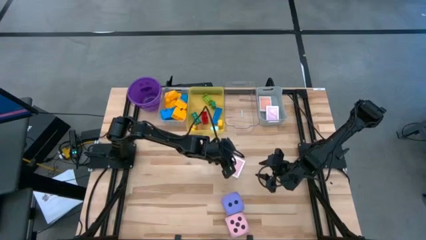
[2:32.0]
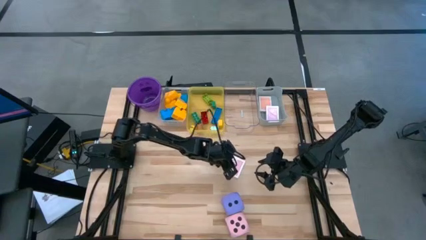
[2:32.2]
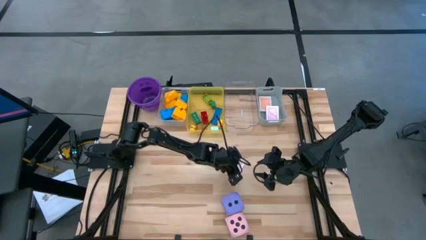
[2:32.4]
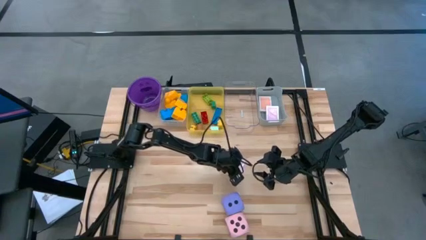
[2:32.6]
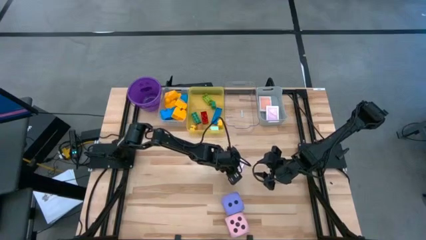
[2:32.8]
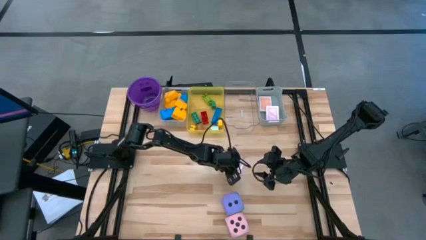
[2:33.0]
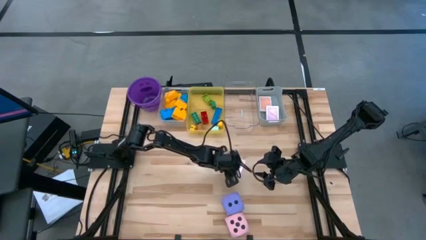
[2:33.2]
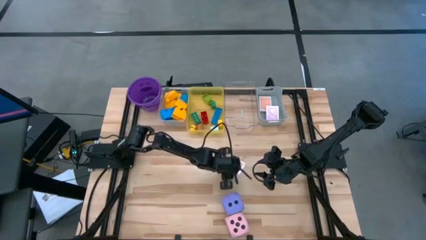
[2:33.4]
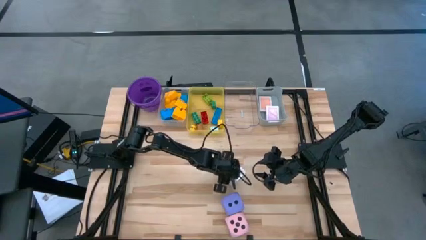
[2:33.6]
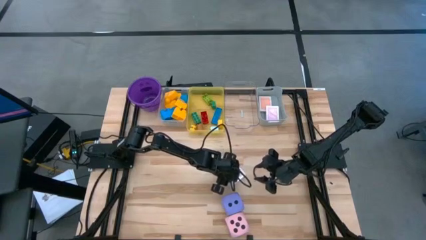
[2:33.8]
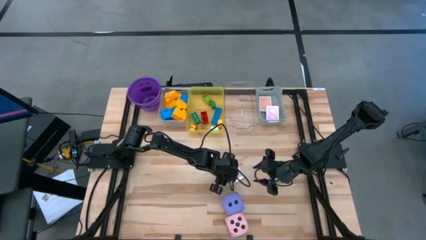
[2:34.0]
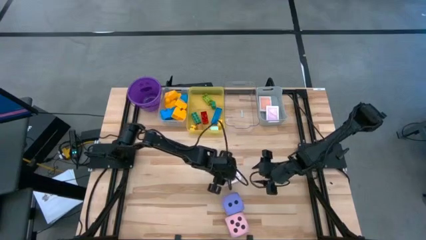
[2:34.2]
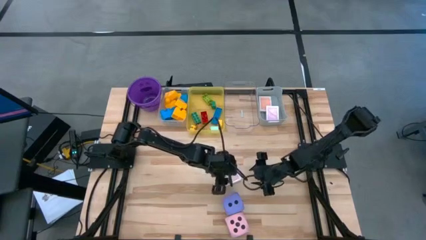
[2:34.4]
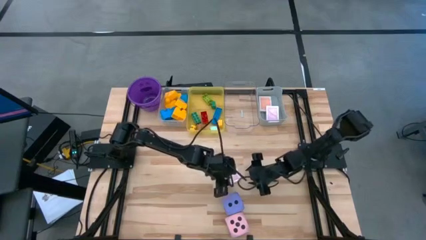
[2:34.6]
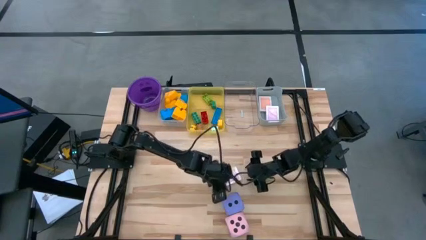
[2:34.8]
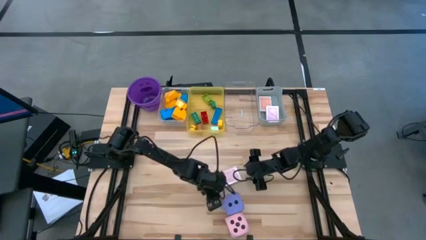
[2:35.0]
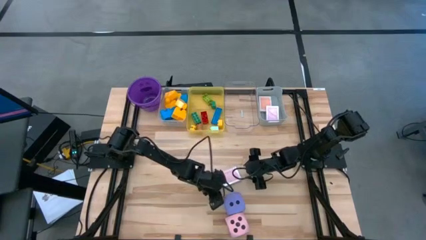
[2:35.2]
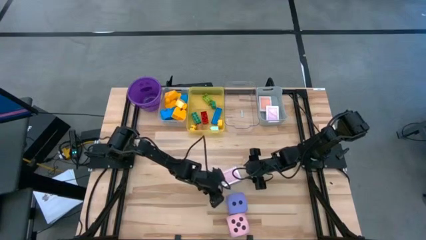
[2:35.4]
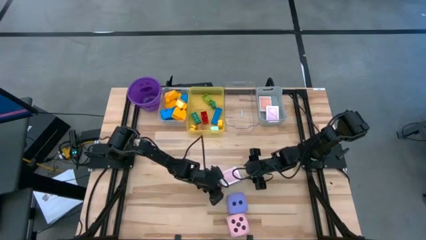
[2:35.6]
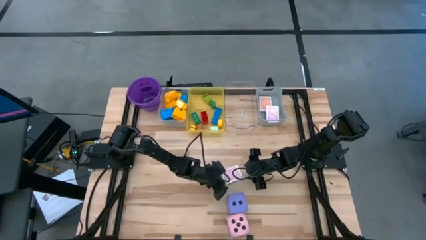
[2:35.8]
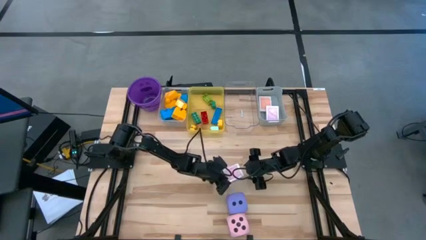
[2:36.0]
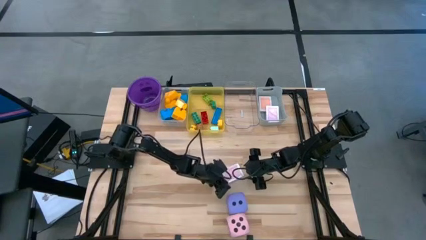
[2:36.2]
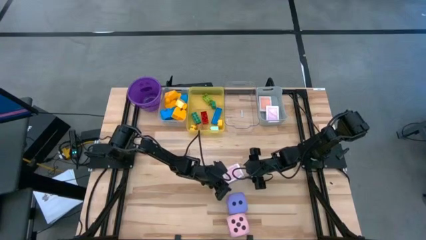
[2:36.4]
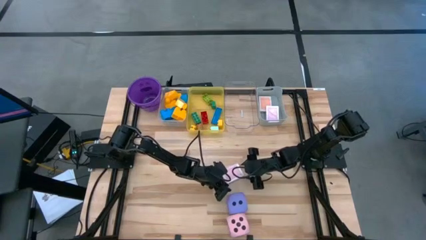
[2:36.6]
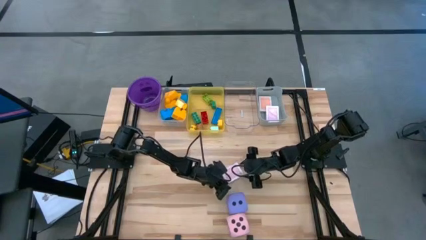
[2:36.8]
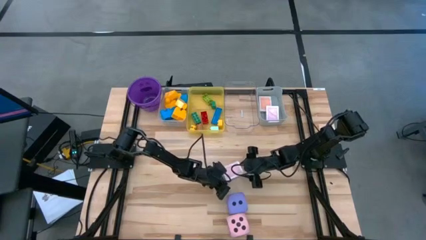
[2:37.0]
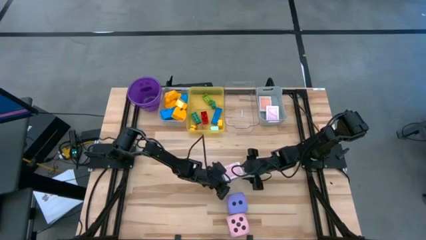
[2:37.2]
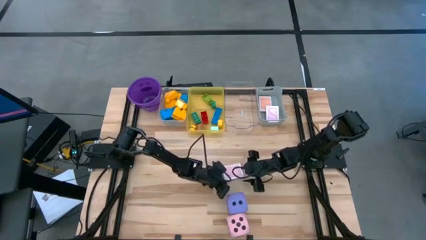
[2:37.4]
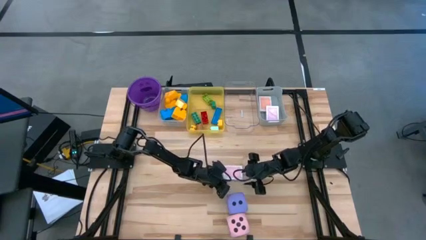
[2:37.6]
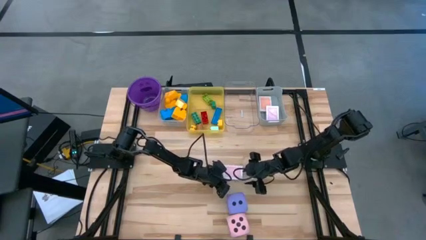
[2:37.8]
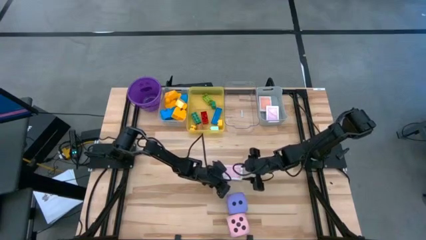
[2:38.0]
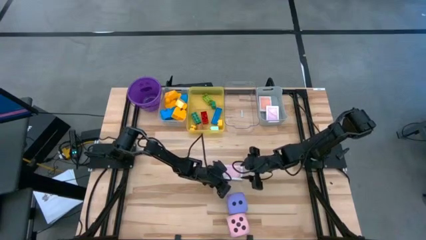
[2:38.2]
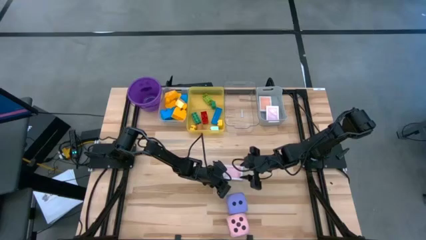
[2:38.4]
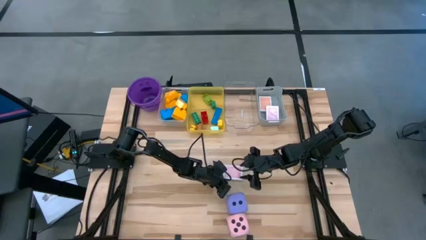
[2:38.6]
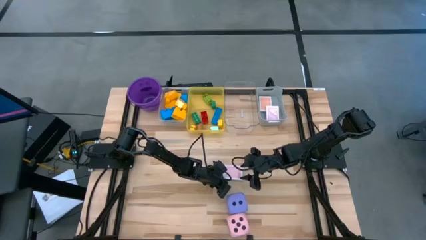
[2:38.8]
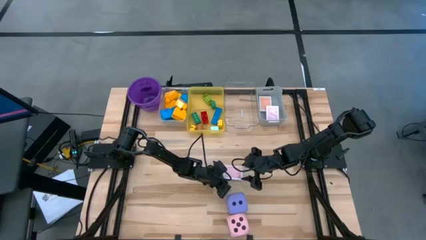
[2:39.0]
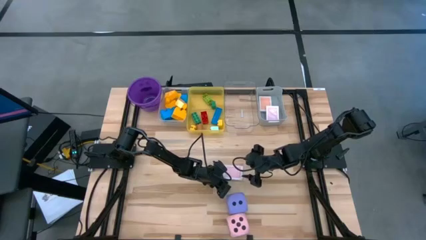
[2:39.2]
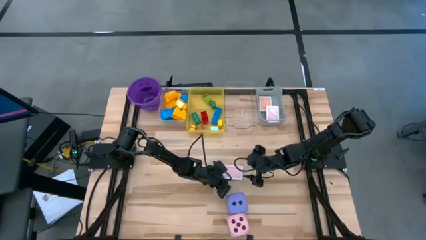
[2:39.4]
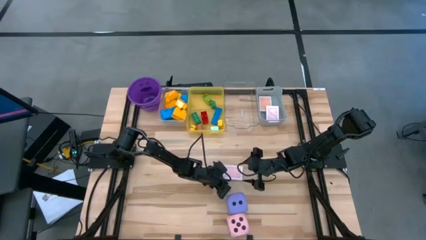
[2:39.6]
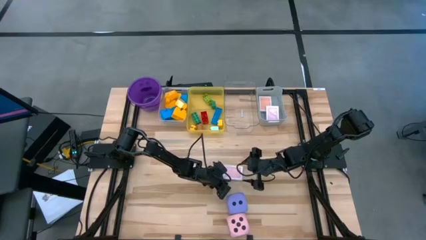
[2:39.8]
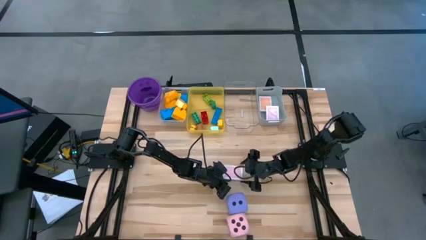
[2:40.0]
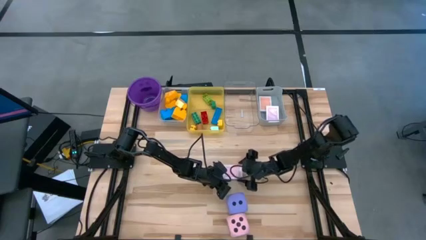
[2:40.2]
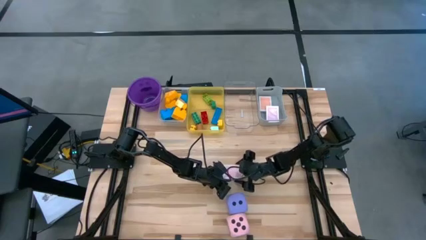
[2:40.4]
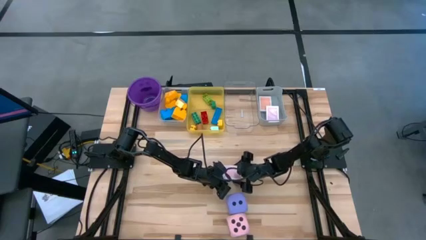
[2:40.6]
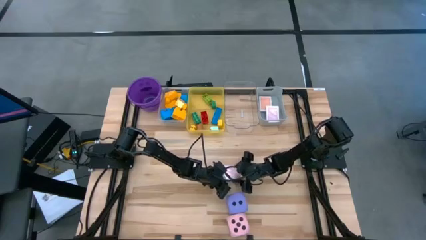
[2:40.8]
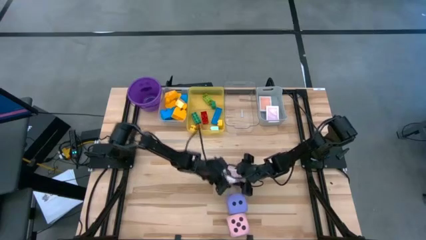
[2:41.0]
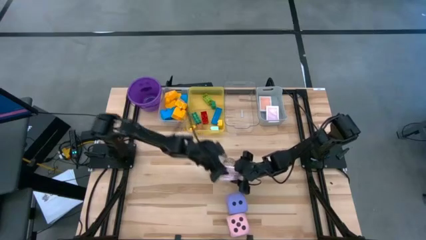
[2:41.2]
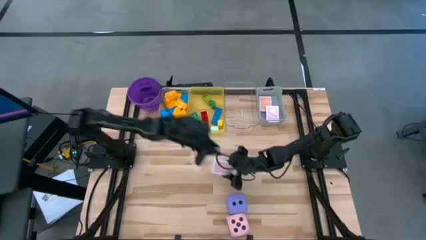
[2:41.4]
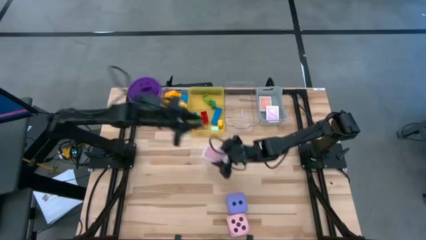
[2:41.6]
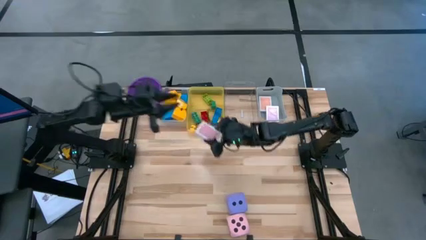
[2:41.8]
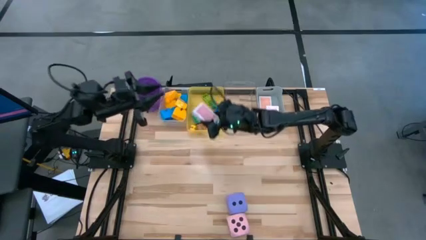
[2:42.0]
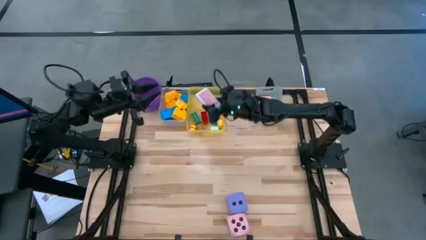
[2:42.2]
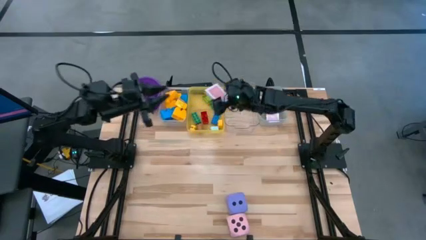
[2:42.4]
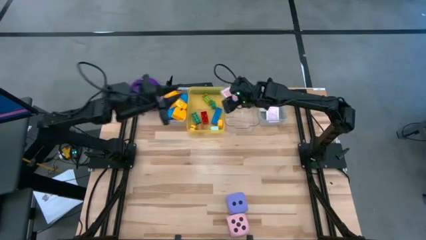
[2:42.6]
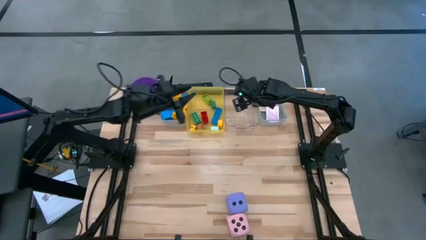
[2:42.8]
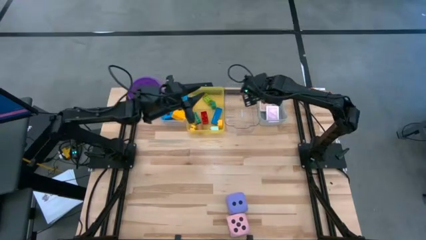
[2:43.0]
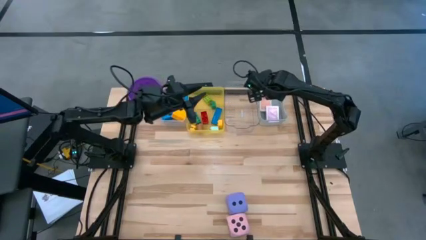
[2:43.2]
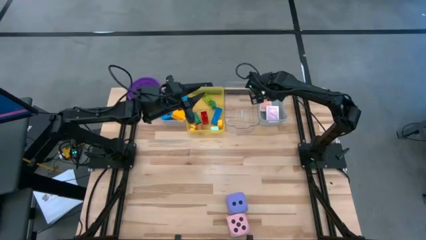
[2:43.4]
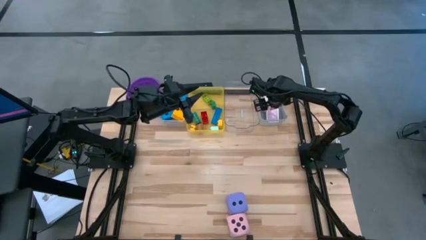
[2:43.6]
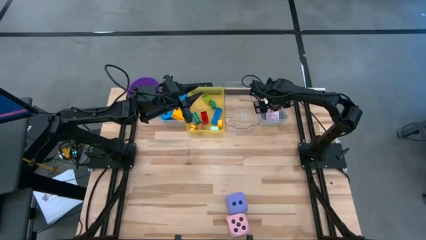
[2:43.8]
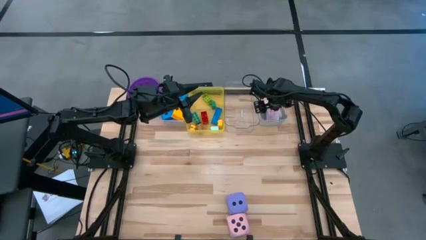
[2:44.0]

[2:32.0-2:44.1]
Task: Pick & Place Toys
Put the red deck of cards into the gray bin

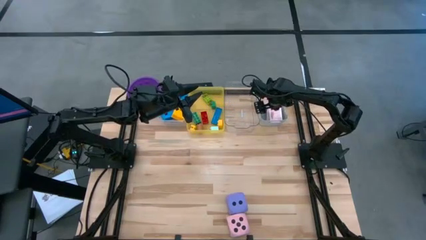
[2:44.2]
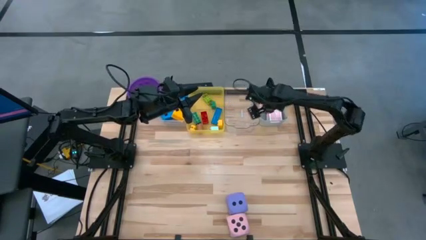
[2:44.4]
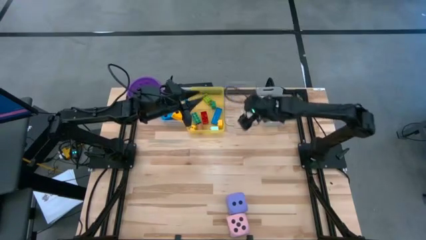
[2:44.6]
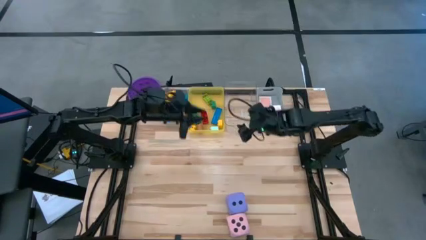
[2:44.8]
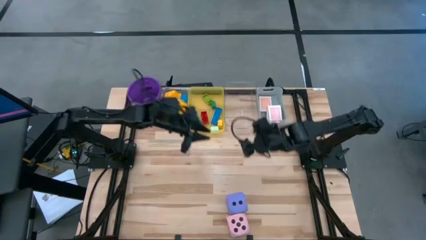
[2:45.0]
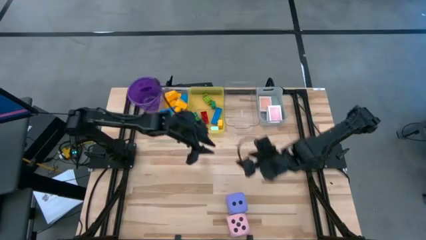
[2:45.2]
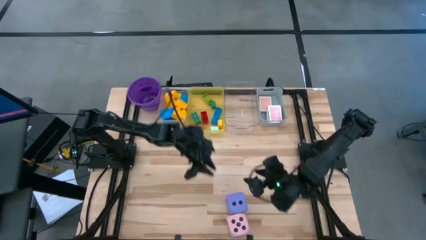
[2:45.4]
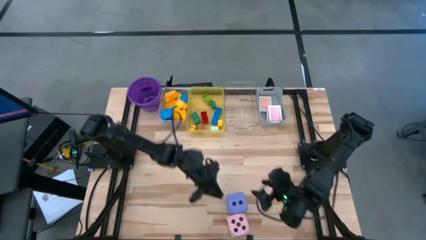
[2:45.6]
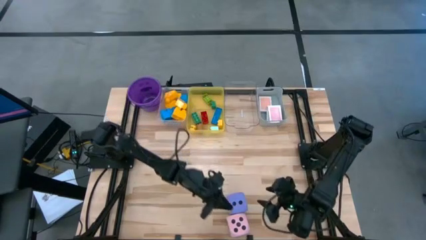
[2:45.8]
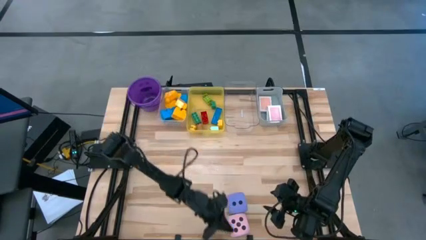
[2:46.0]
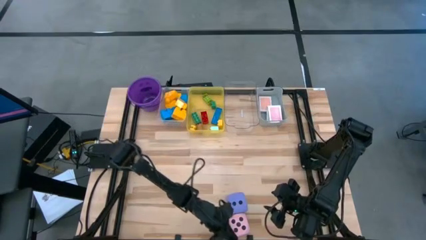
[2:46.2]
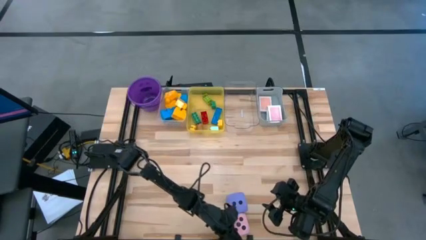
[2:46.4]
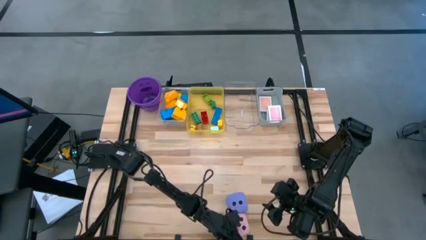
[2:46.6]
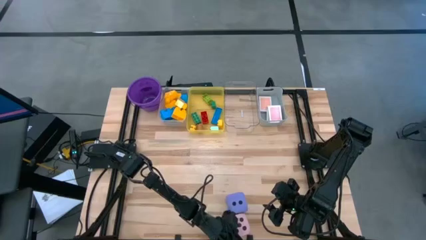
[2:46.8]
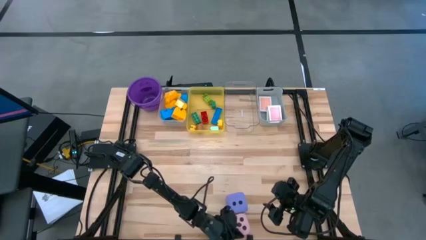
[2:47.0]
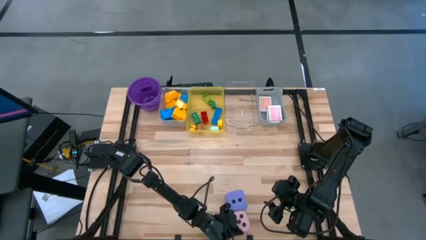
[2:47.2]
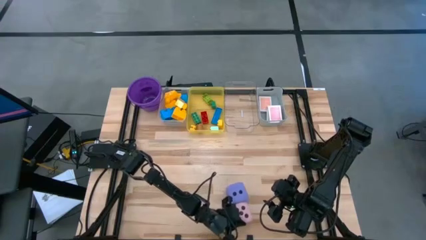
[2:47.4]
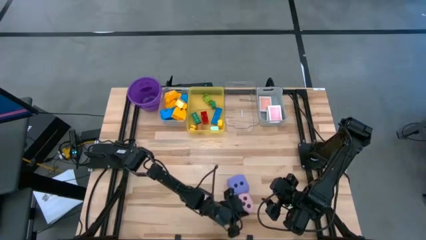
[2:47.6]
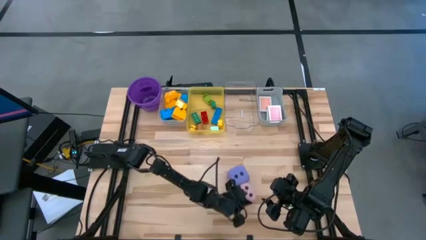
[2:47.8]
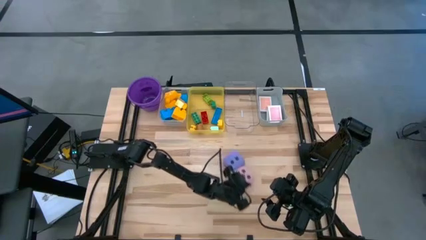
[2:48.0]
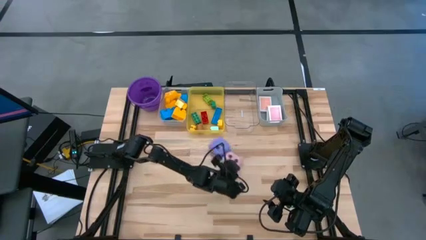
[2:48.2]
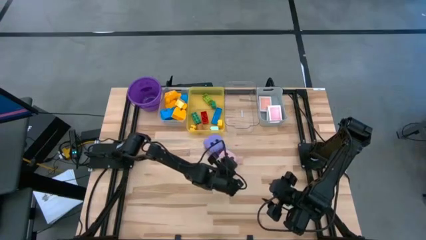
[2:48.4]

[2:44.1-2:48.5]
Move the dice to the center of the table
